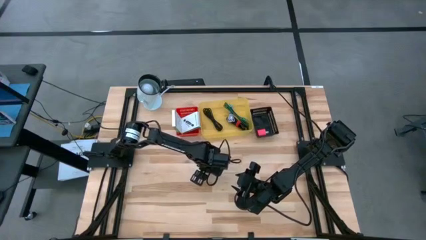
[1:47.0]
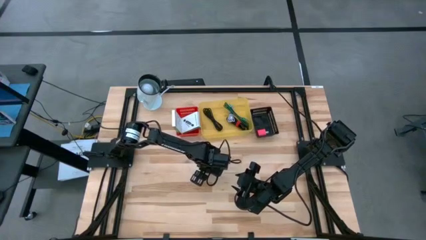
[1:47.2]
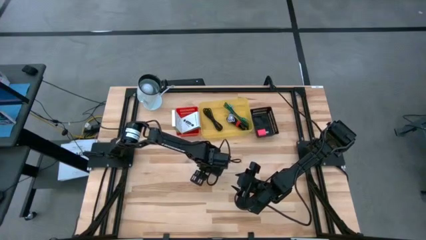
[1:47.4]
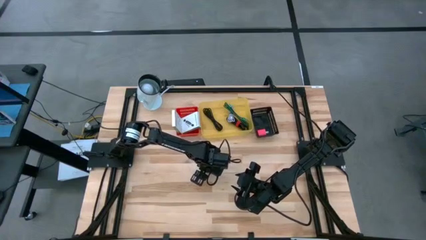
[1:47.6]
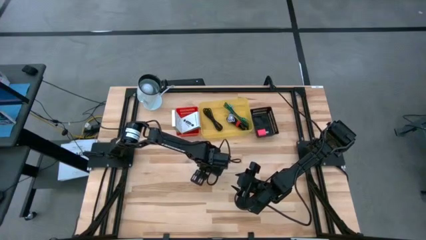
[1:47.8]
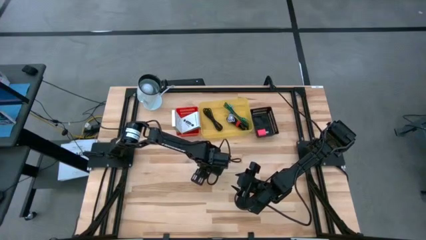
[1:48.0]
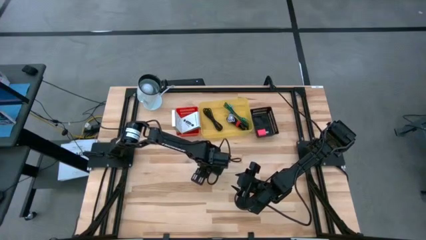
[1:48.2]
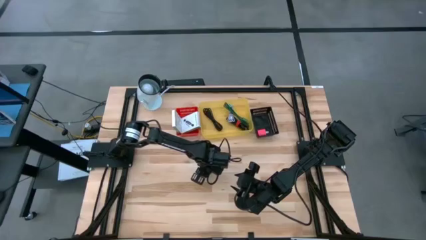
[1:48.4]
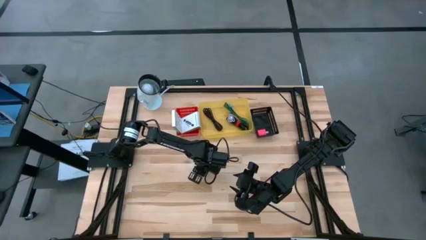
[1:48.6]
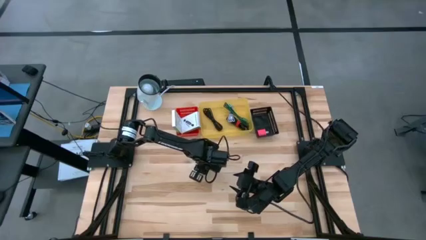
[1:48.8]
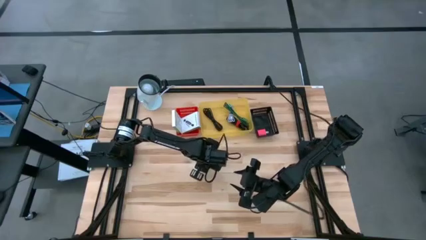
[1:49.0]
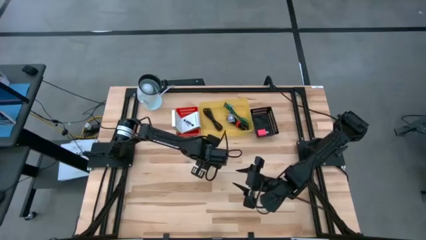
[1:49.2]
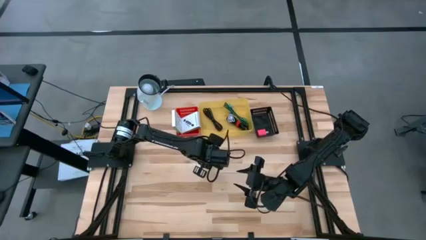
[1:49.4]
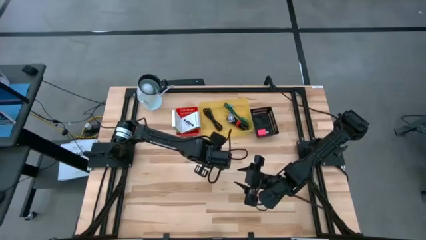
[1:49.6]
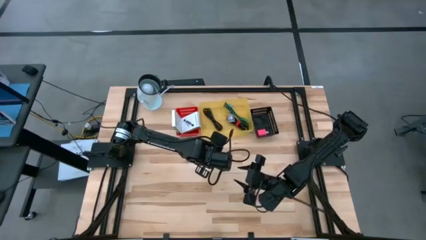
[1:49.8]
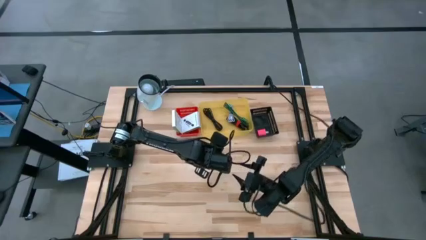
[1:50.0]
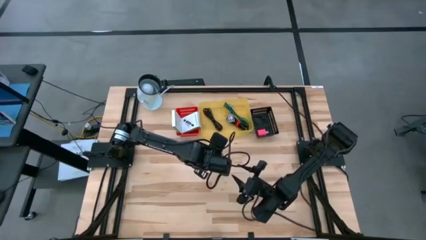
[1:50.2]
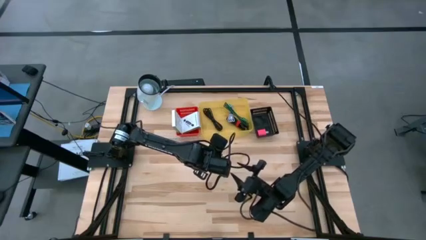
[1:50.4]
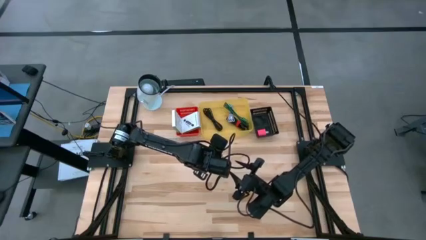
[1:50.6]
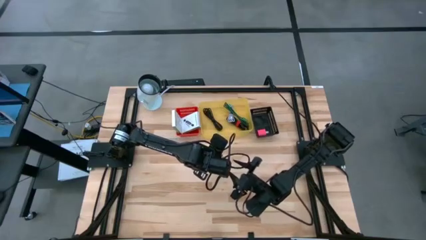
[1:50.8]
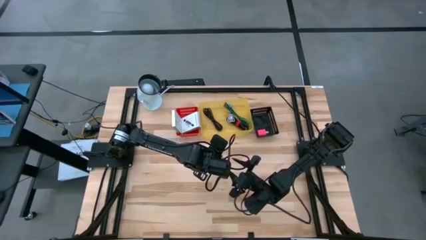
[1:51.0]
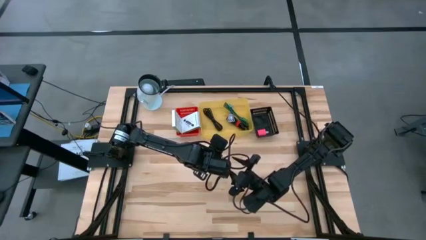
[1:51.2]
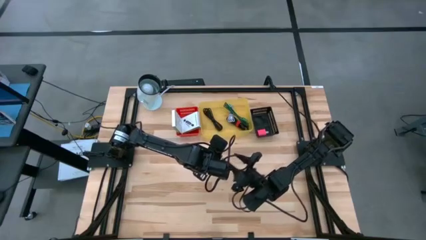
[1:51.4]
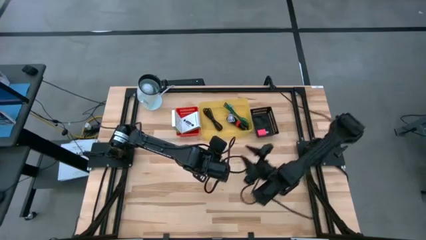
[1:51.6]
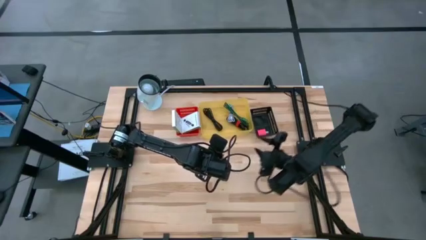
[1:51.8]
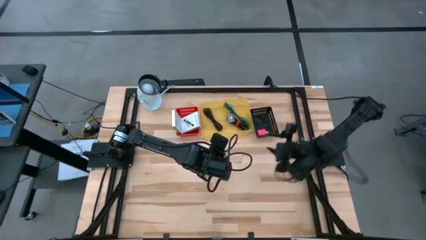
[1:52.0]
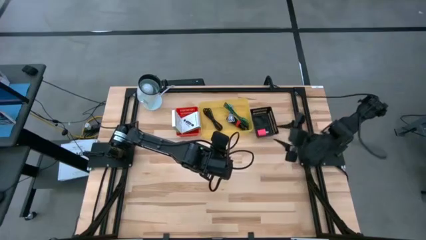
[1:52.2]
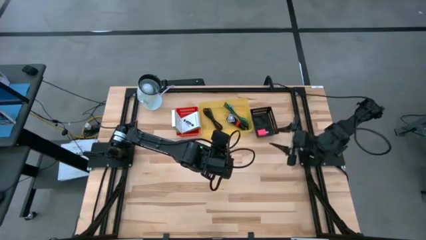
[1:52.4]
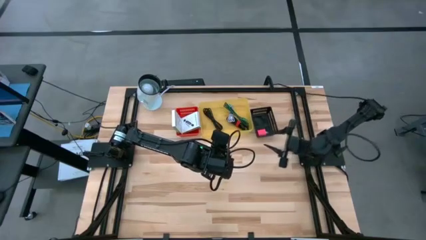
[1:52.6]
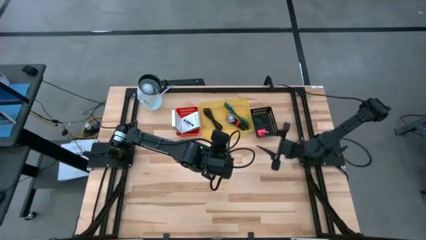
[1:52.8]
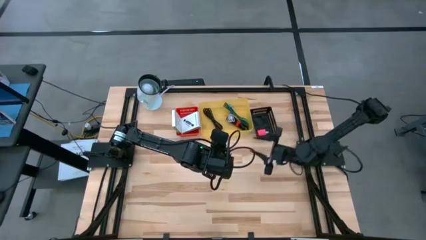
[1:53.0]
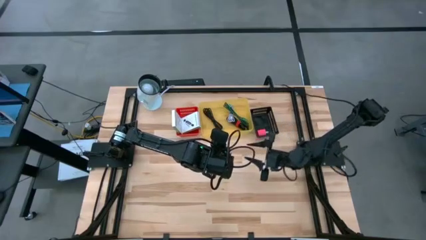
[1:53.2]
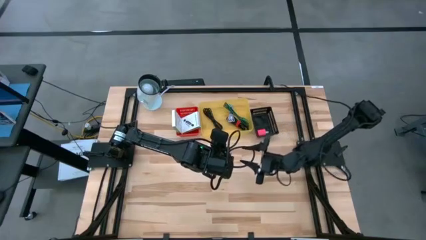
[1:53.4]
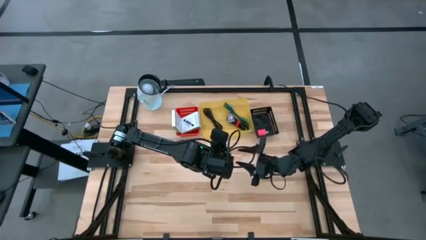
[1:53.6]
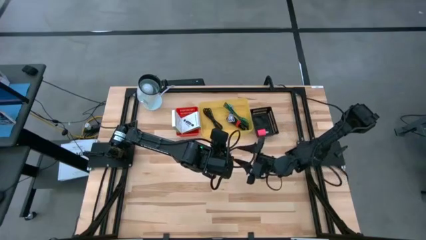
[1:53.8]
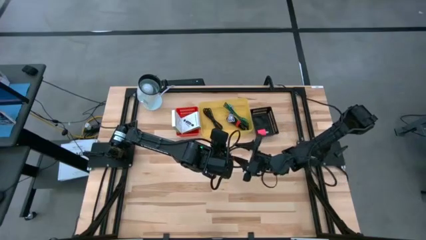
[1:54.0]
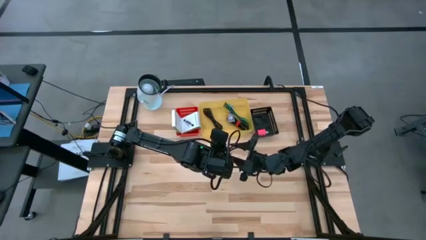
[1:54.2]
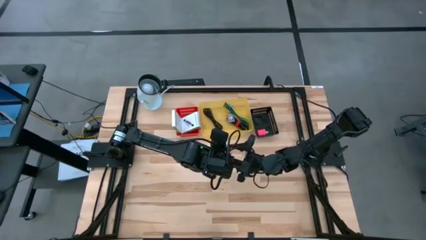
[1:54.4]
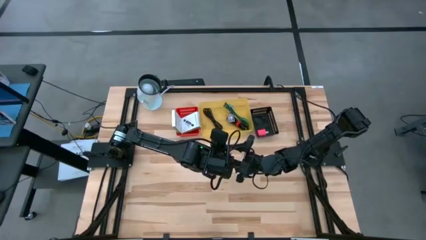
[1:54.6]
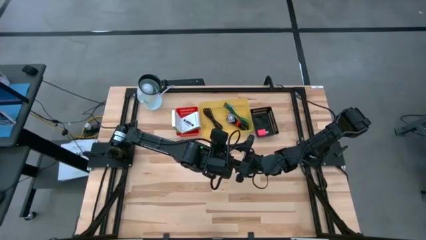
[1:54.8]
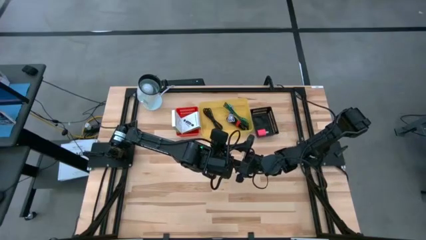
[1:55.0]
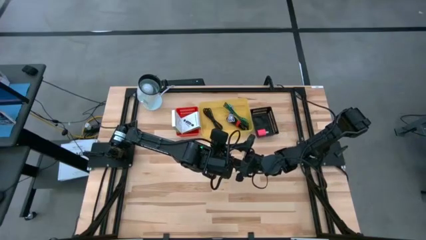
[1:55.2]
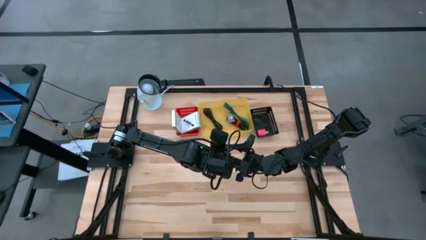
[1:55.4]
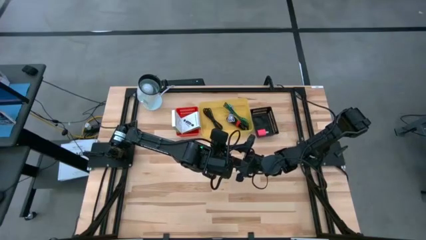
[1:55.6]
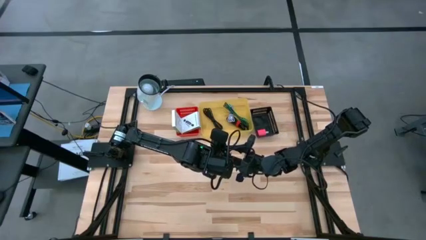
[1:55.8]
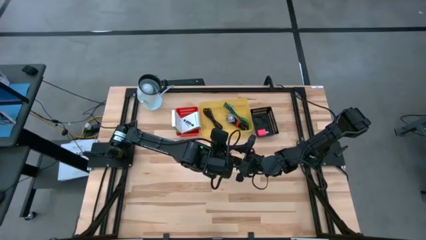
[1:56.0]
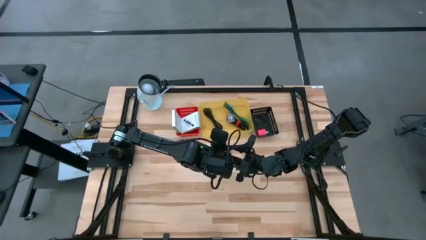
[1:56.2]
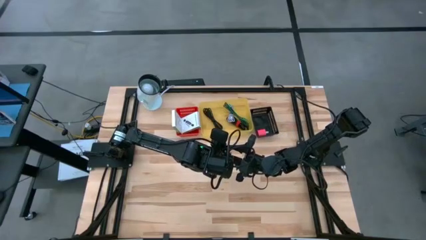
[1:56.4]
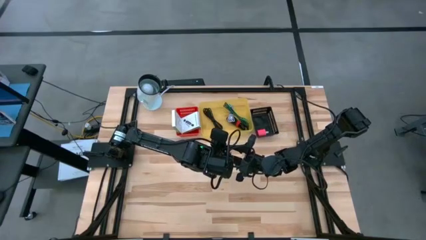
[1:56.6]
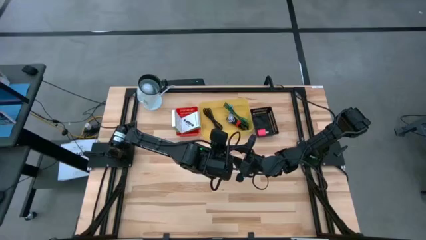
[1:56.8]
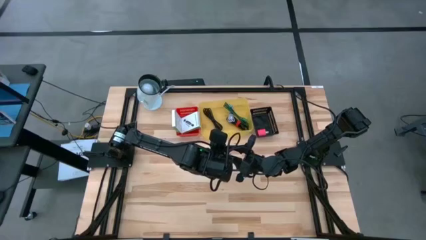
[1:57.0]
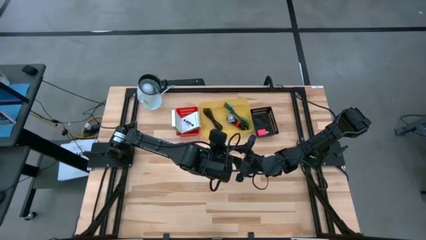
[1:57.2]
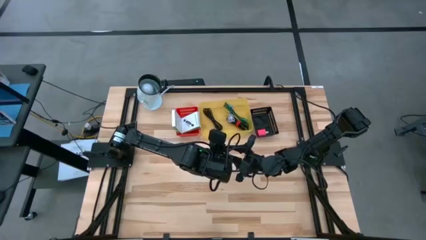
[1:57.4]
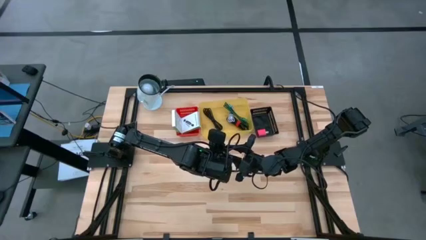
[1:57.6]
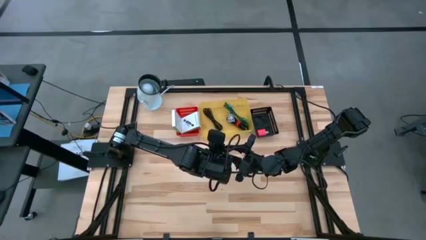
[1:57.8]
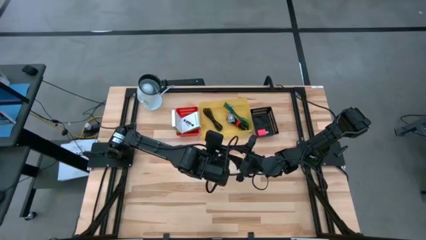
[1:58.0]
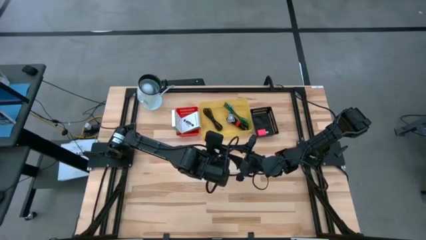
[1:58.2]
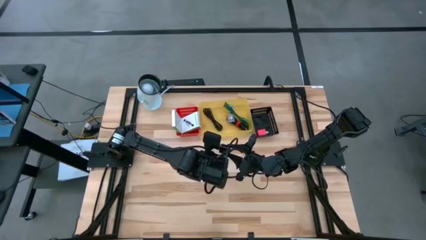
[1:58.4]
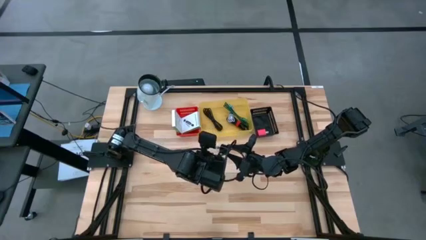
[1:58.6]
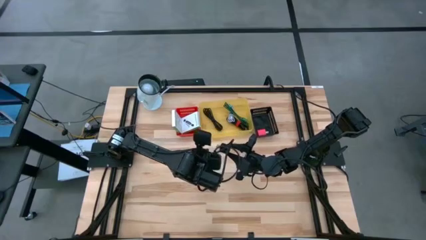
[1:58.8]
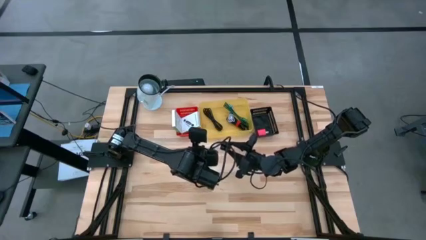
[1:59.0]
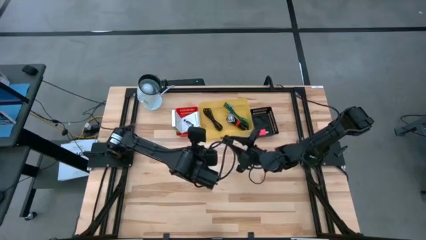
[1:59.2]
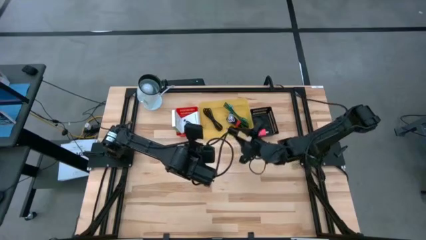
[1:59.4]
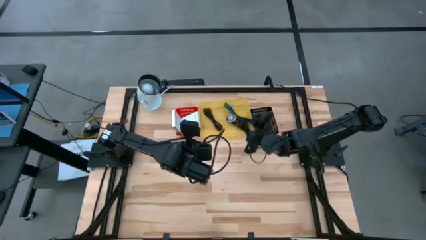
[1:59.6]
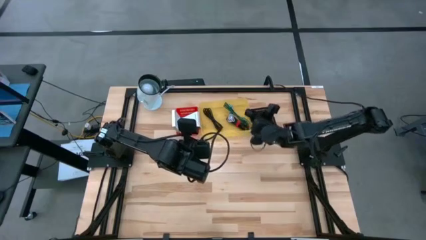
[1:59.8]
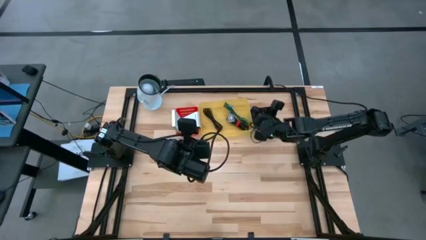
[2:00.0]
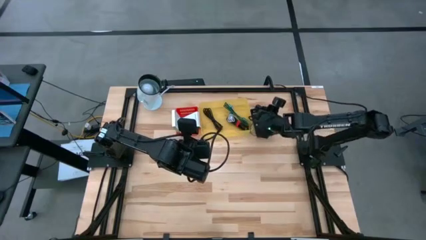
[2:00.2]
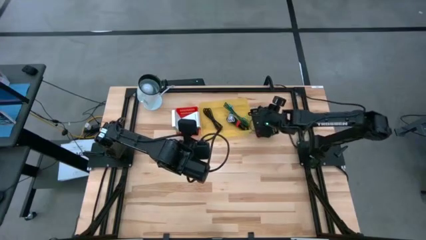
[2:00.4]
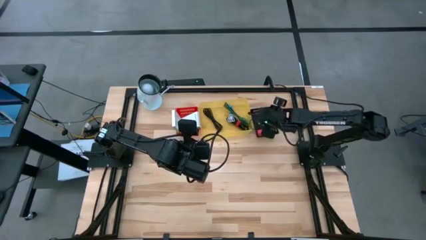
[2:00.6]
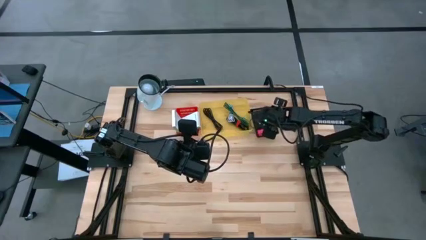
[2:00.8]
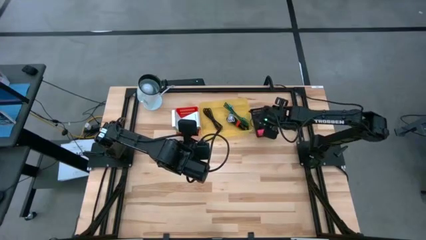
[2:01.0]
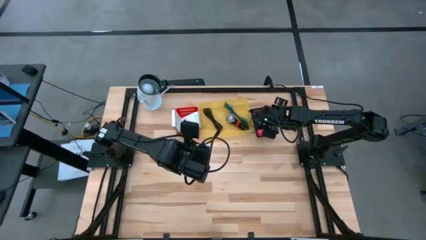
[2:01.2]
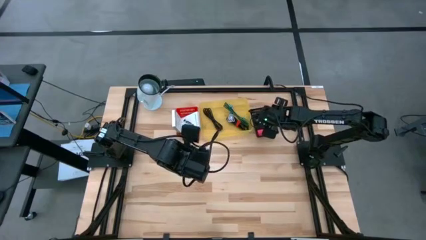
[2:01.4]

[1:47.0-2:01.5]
Task: Pick and place items into bin
Put the black charger adapter into the black bin

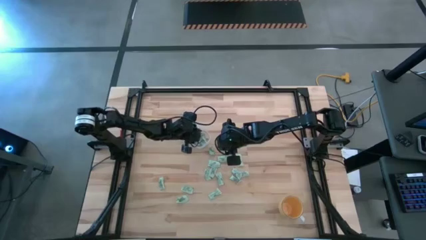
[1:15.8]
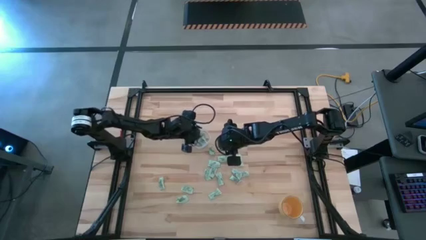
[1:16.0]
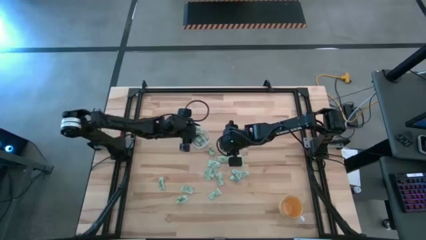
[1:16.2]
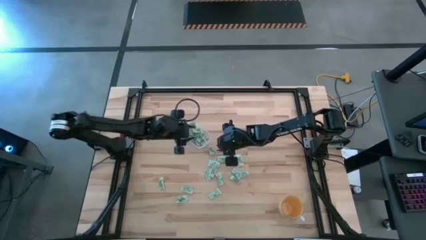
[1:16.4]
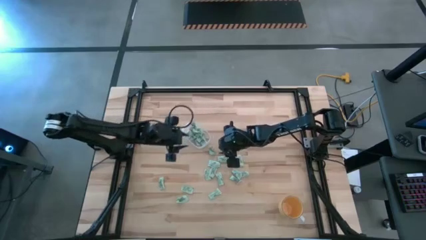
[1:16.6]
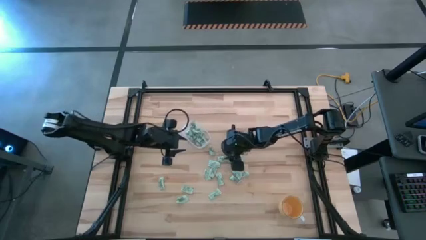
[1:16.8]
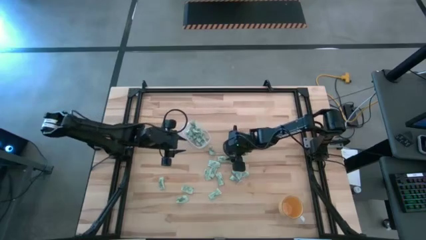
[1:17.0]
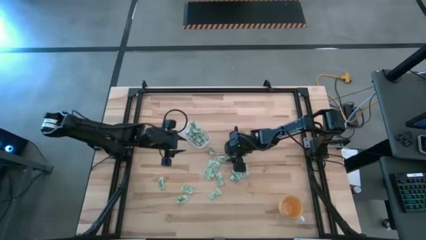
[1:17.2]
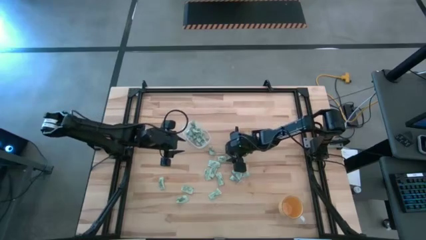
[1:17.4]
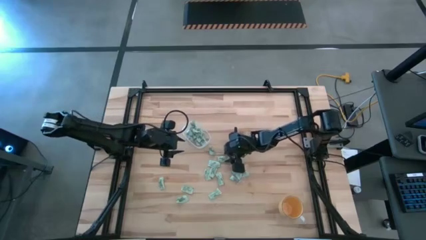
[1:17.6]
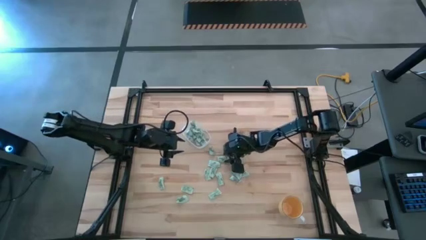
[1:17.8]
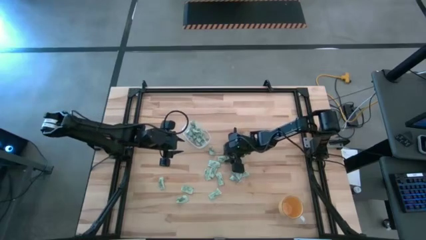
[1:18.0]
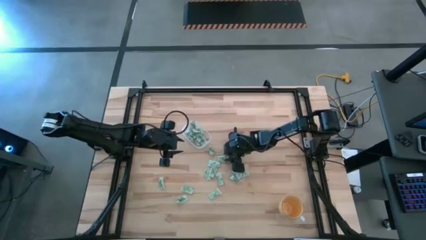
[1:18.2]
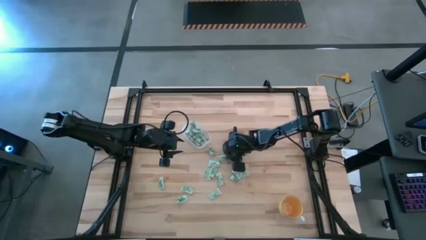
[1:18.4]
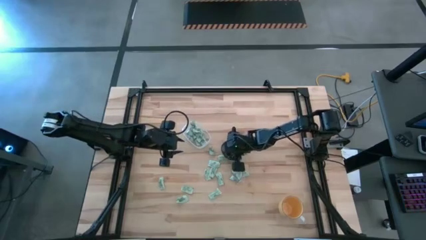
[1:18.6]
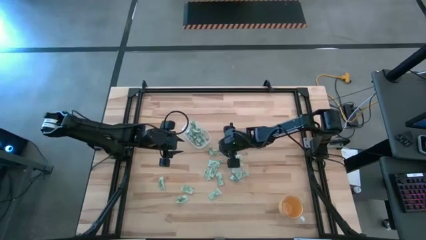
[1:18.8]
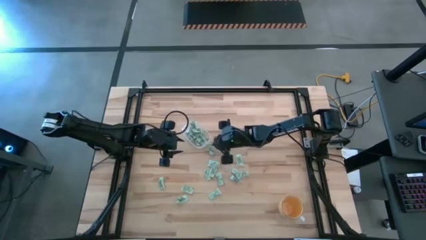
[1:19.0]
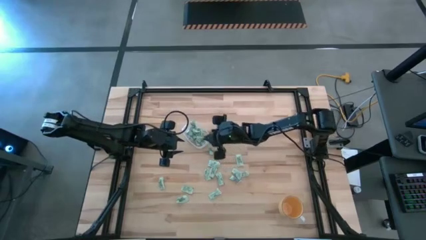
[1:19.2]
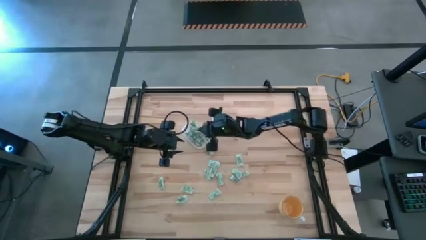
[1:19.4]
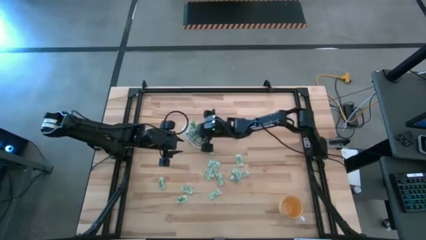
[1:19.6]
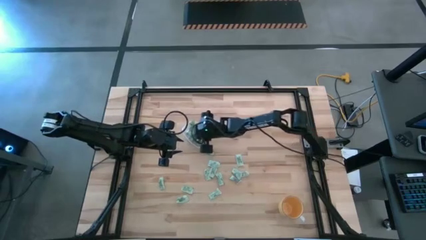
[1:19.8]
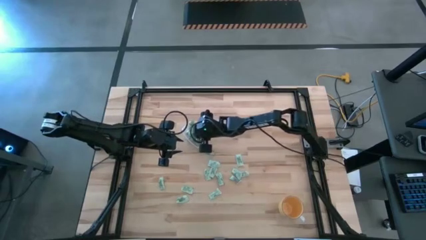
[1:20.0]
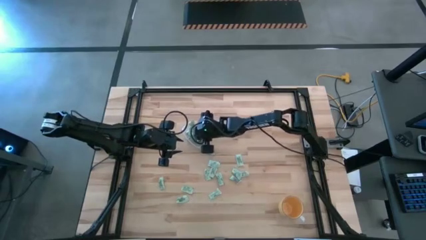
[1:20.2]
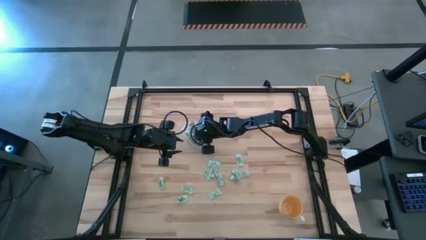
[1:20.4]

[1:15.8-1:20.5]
Task: Pick and place Stevia / Truvia into bins
Put the stevia packet into the transparent bin
